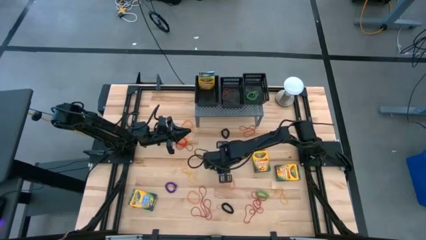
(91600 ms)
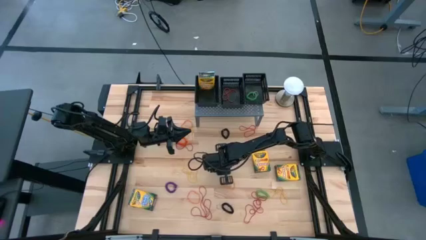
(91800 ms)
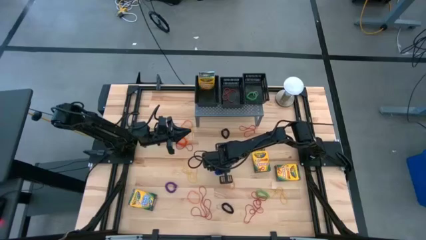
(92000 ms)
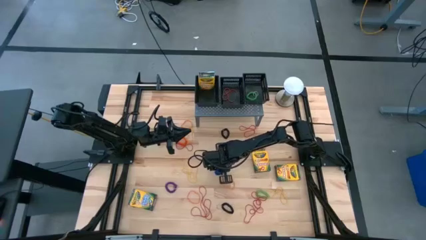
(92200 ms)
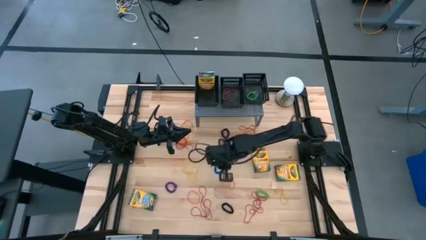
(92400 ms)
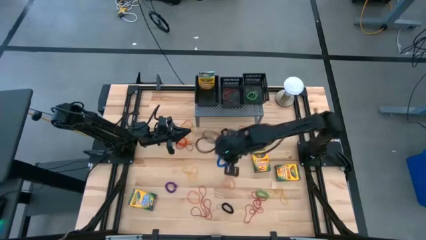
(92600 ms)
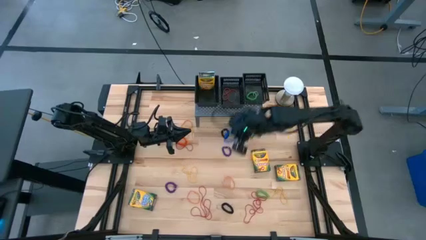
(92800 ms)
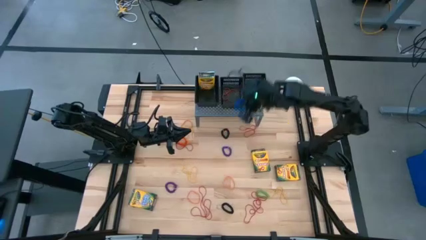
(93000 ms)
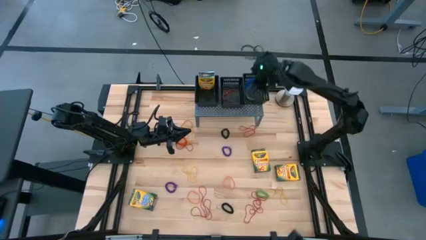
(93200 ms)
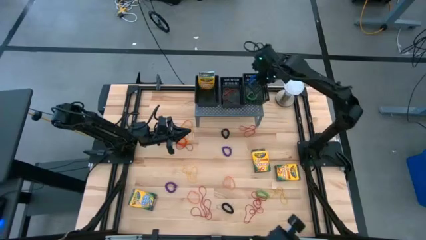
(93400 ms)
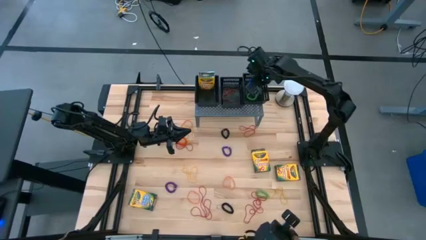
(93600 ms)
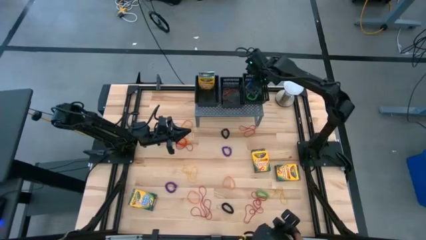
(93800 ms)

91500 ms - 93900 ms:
Task: Sort rubber bands into baskets
Put the blue spring rubberband into the right black basket on the shelf

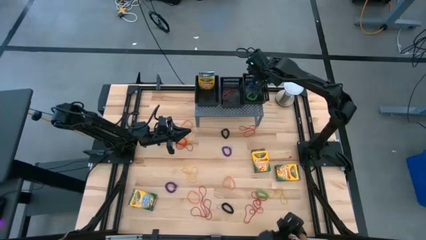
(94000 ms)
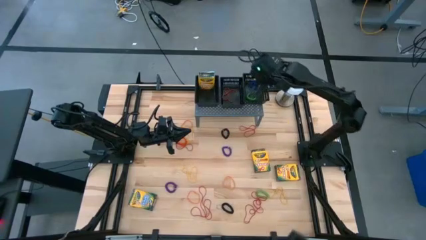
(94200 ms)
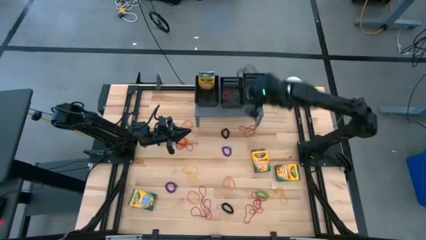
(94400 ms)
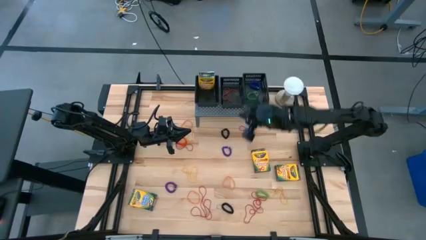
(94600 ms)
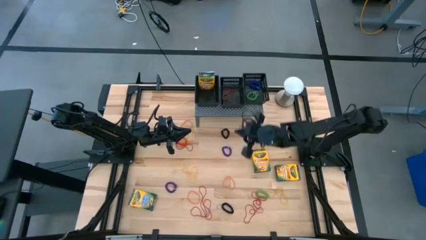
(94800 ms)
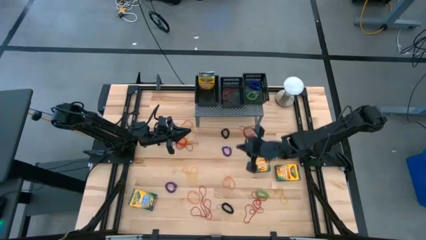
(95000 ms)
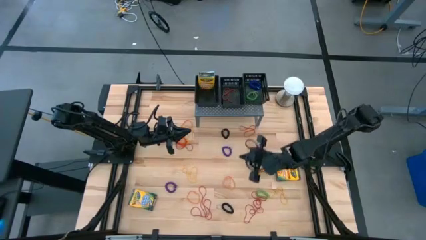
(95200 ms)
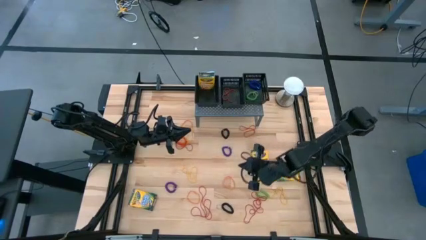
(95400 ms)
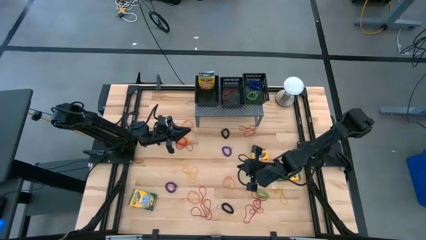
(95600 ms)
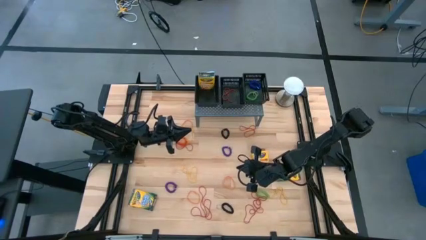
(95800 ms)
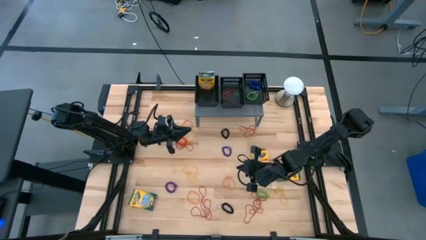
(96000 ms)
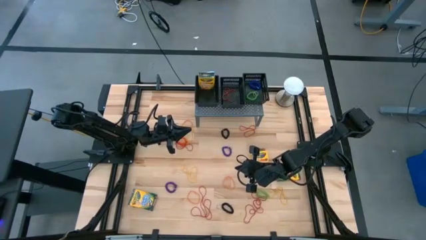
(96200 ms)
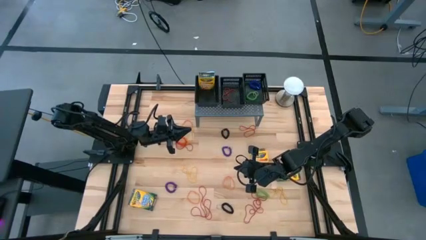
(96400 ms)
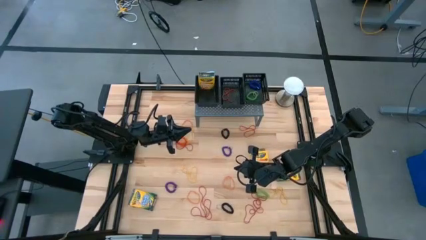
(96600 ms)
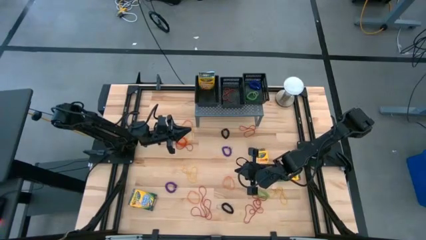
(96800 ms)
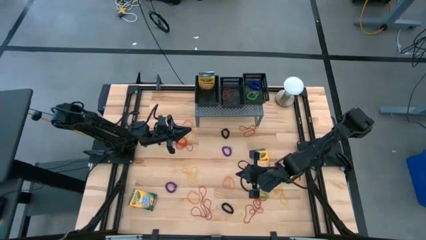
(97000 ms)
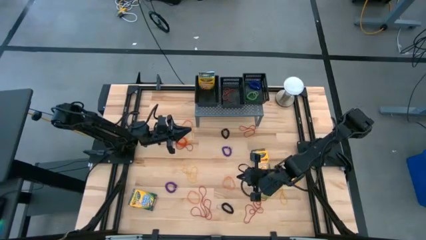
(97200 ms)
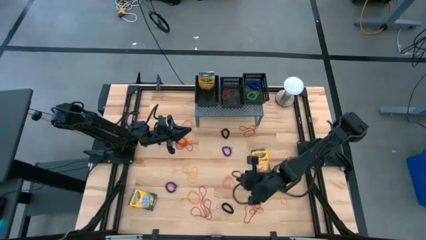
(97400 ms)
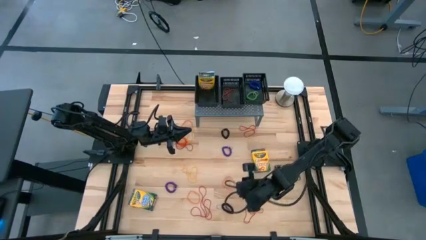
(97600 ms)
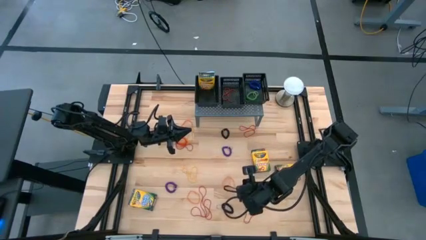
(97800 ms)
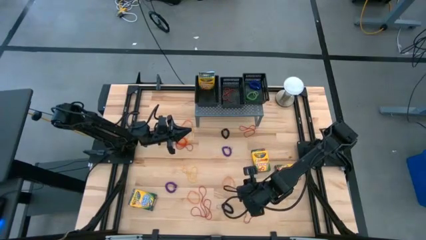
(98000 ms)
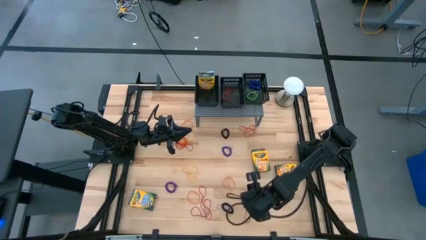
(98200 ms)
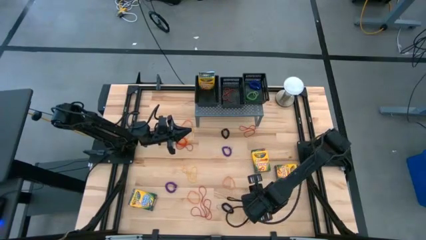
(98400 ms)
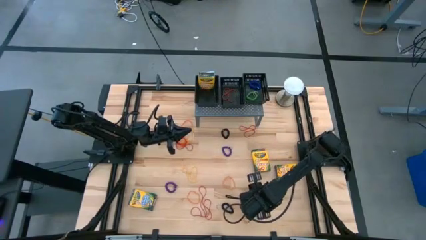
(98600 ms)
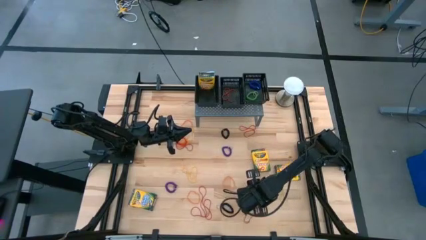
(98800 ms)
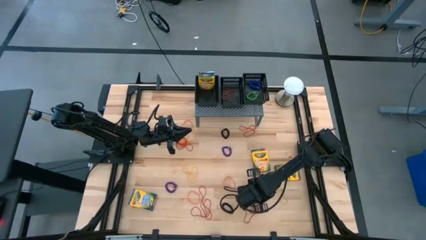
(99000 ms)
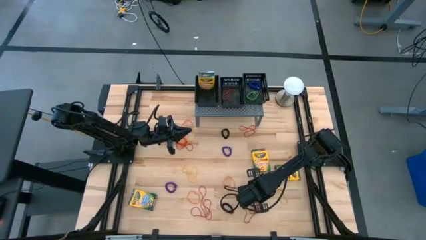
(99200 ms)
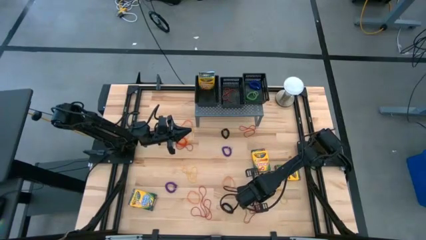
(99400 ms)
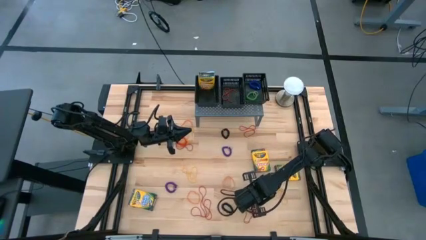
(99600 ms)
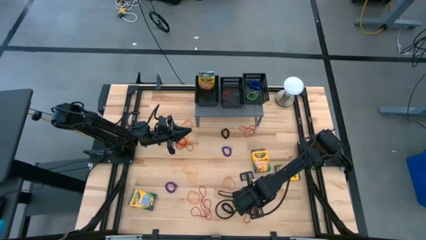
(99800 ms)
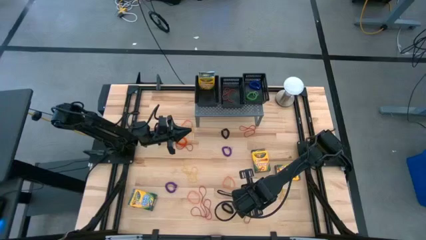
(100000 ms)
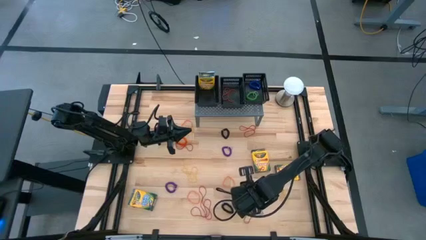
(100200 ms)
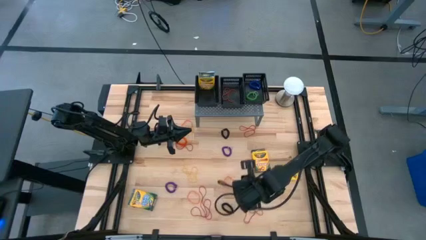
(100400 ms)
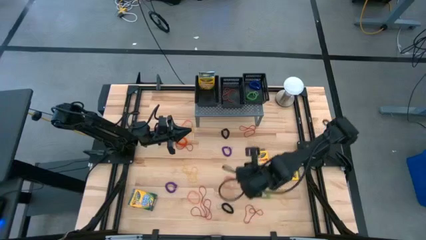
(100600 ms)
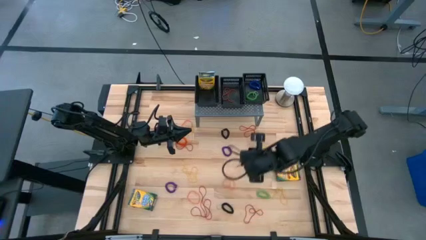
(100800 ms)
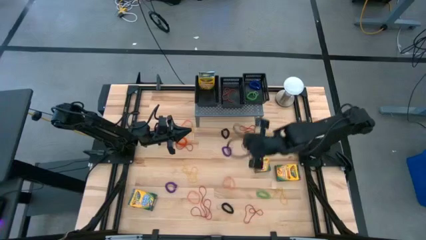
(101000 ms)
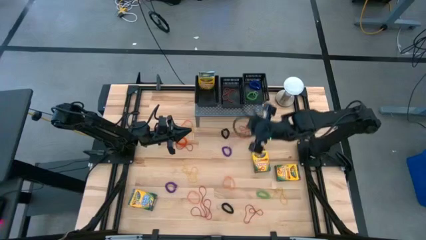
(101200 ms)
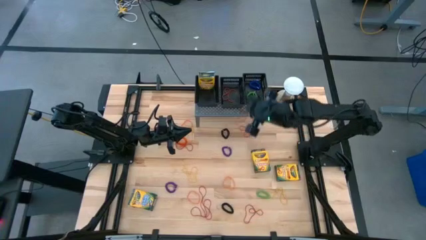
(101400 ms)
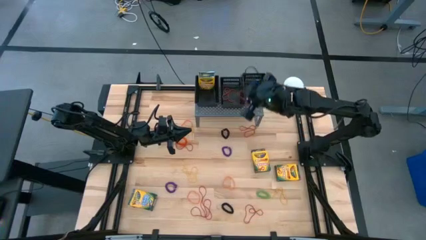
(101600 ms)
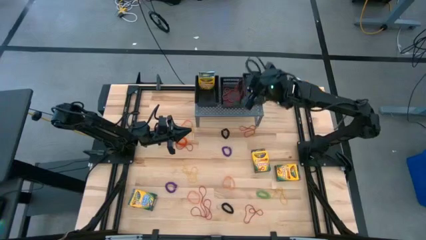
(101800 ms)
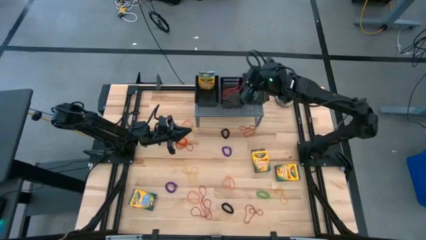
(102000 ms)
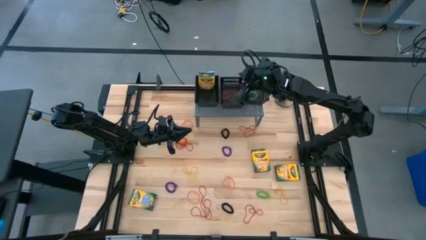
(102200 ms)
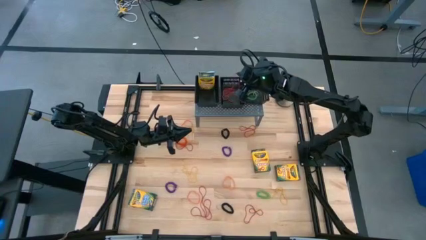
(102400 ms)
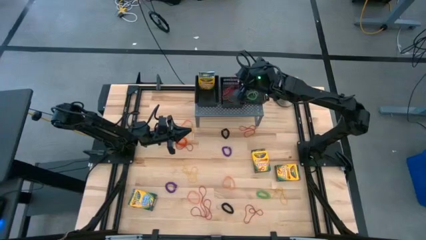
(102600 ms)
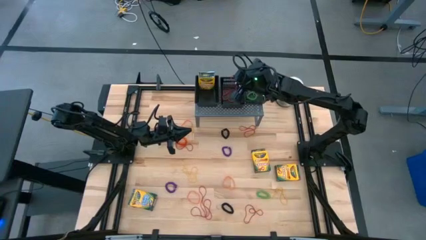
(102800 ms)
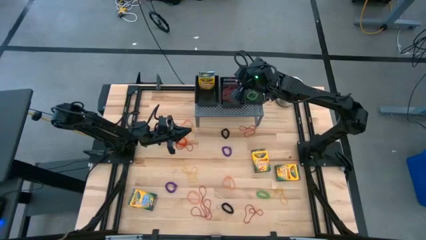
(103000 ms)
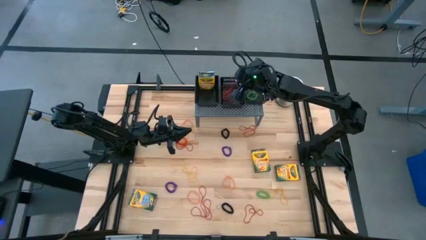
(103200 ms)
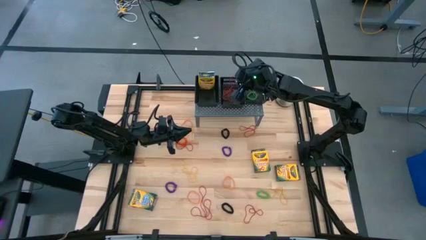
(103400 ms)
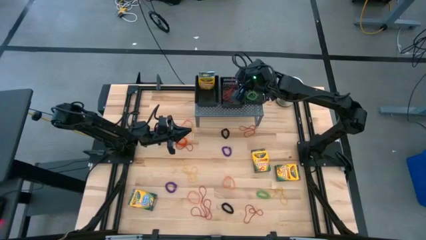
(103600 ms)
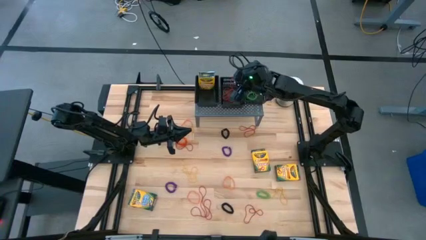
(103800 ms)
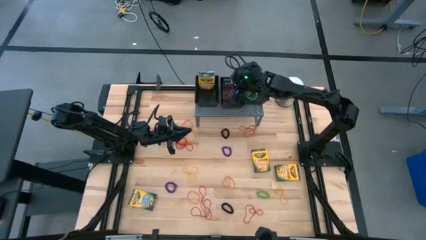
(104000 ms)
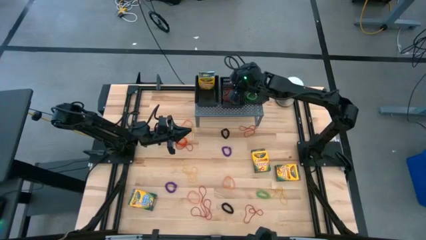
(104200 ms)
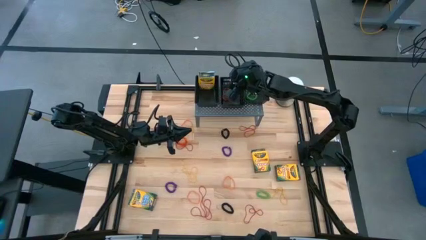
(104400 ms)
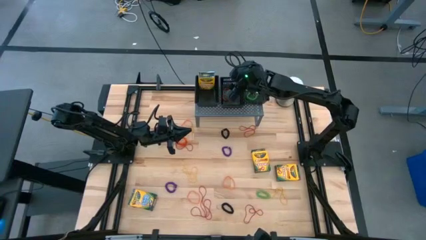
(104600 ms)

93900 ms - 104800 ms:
Put the red rubber band into the middle black basket on the shelf
